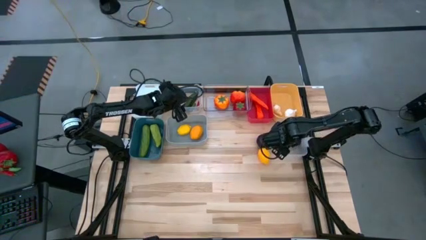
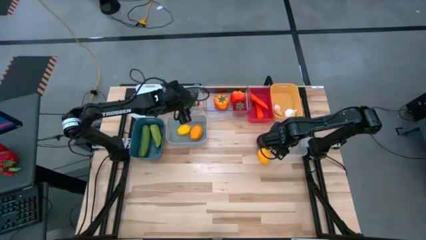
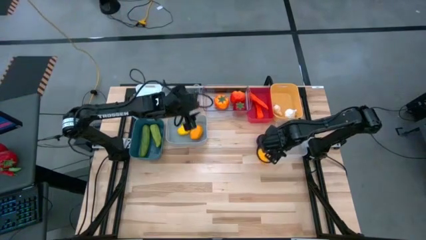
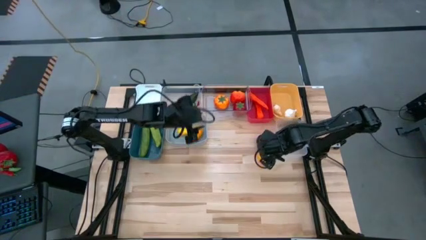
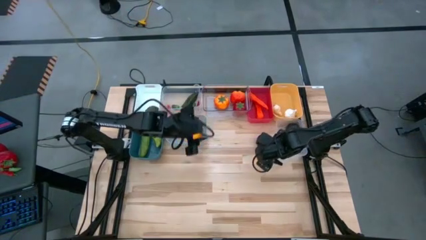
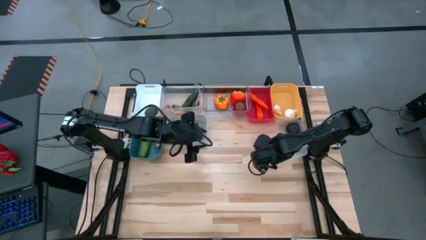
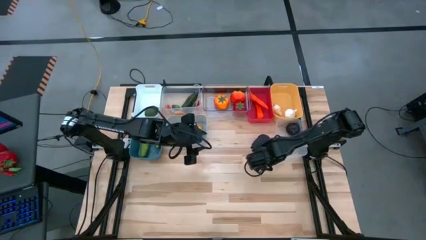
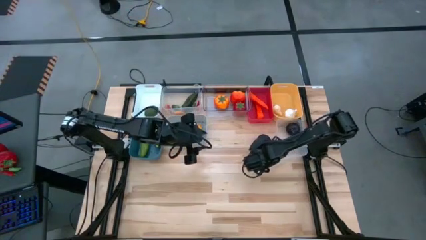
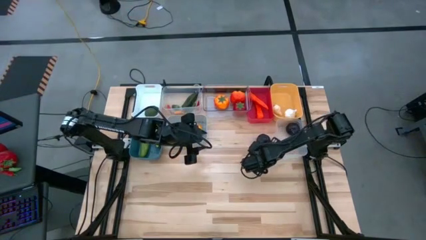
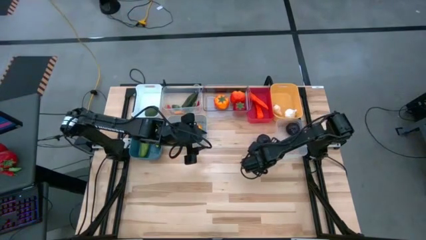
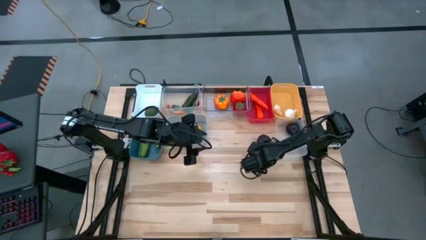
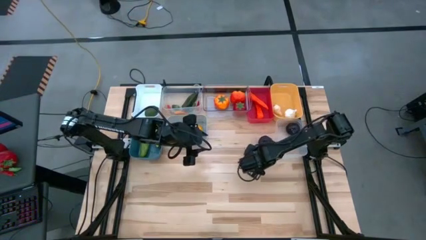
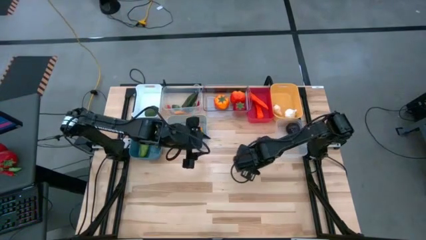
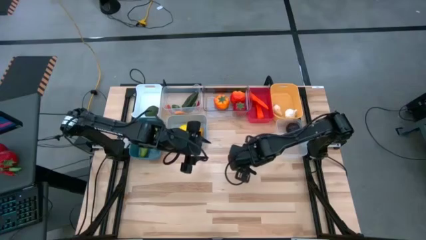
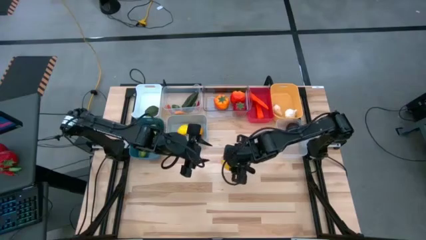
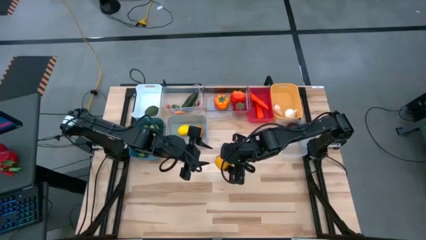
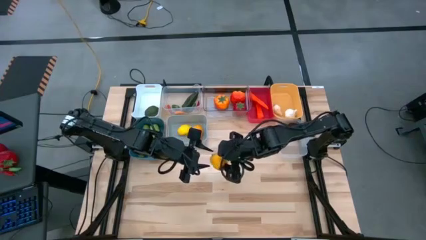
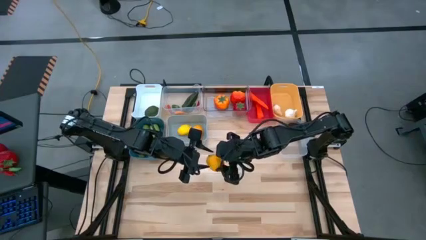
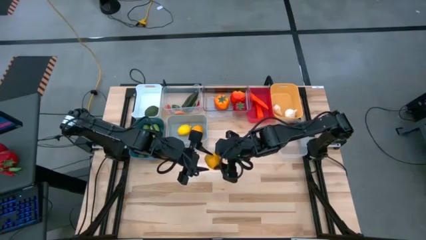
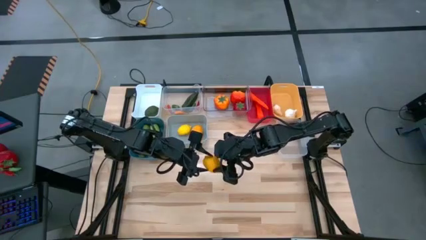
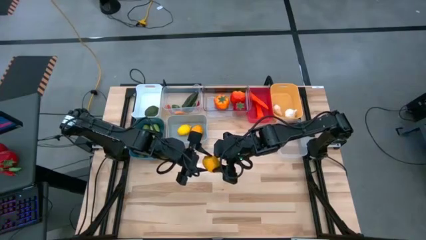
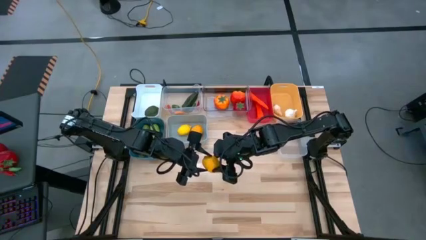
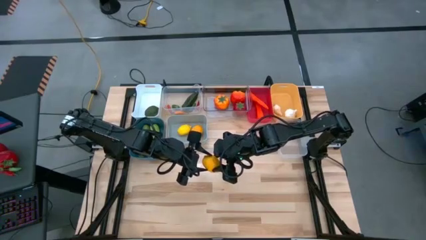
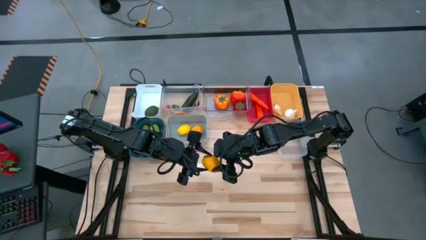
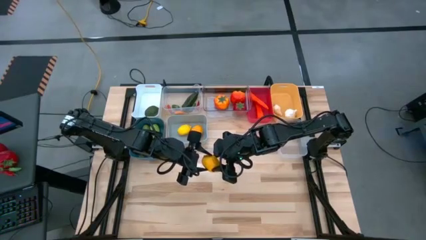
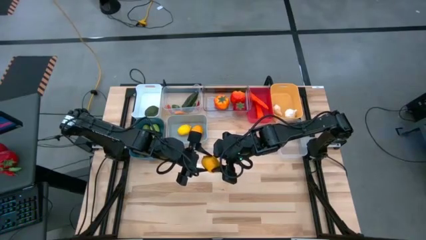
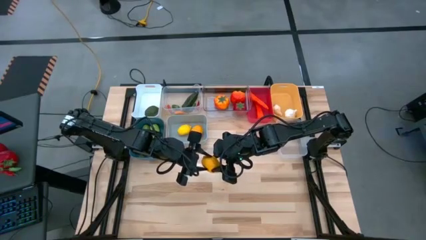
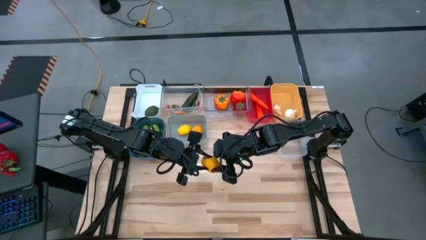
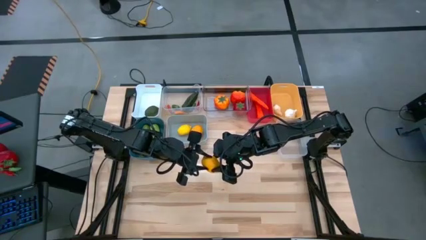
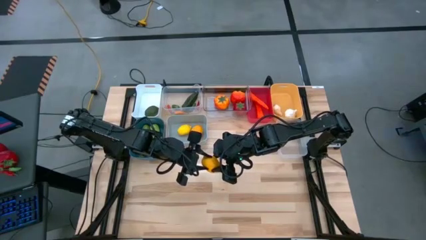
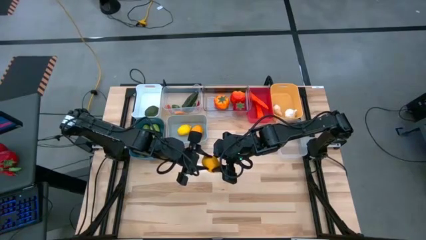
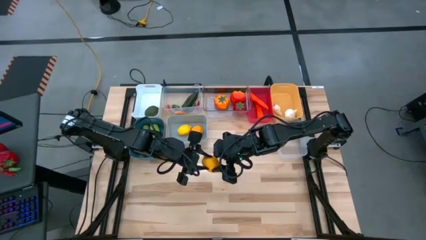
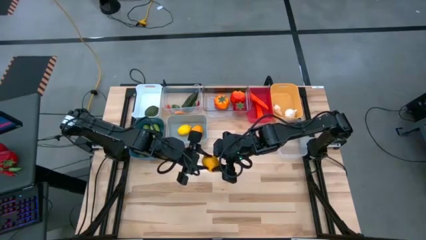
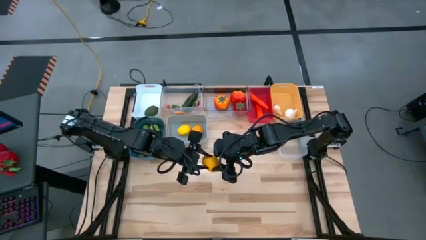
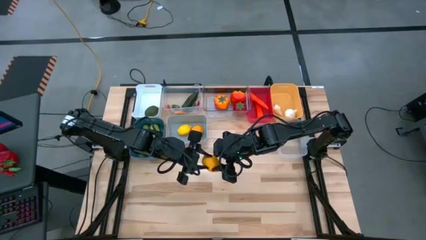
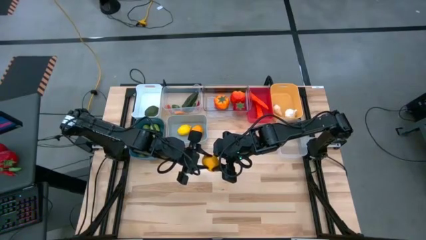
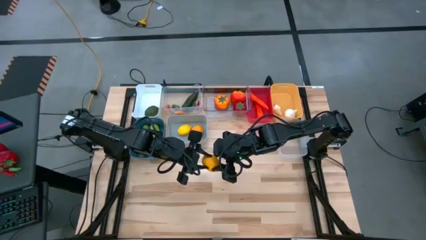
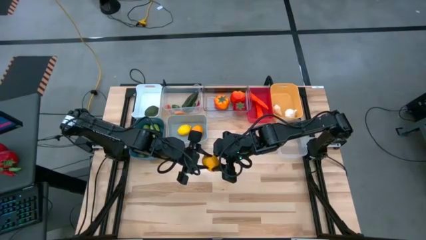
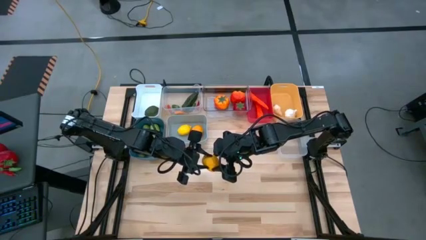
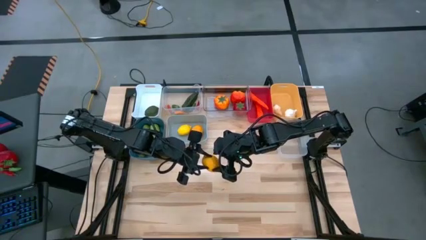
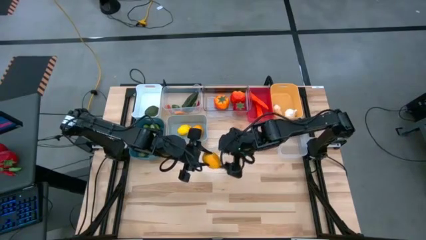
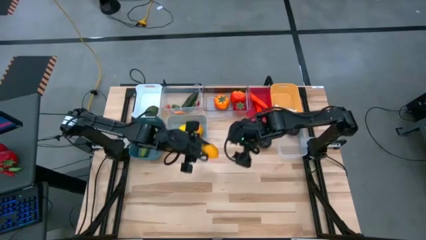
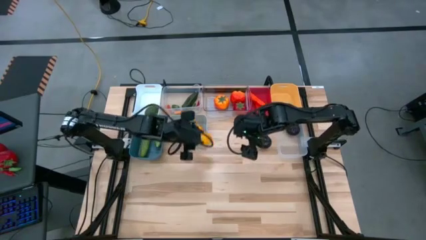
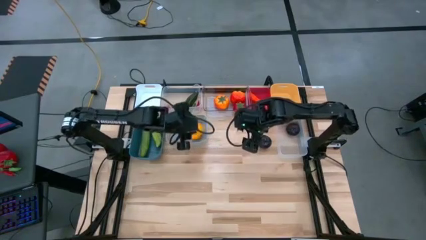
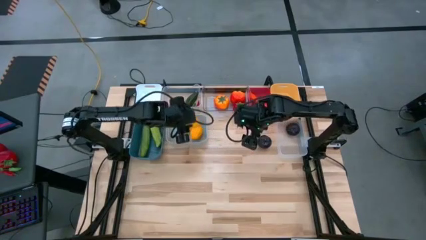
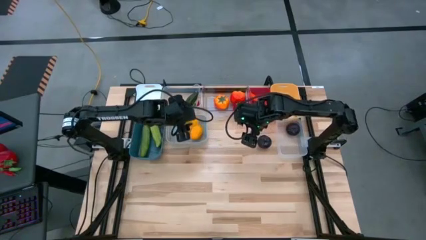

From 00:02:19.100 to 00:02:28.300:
Task: Sort produce into baskets
Put the lemon into the gray bin

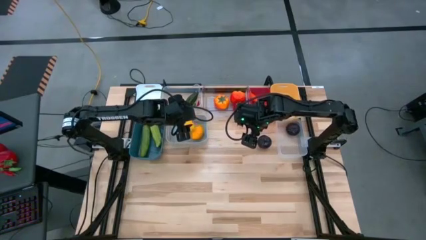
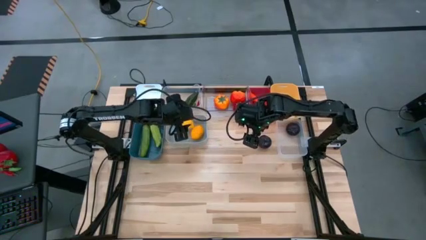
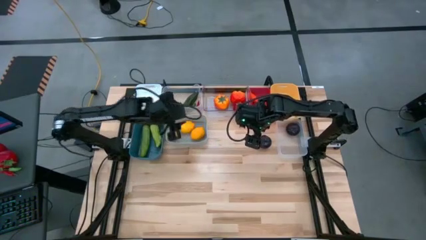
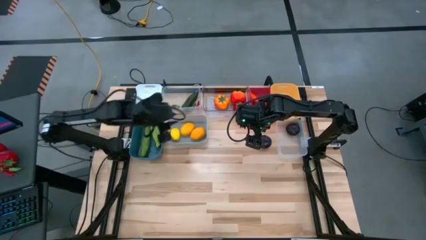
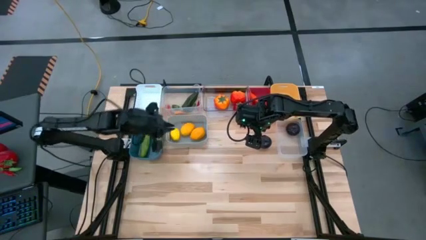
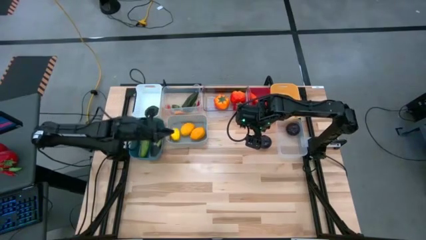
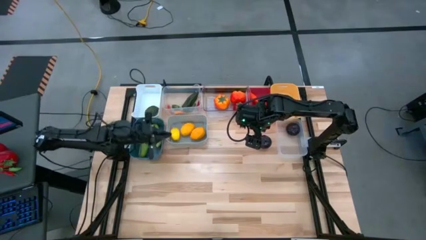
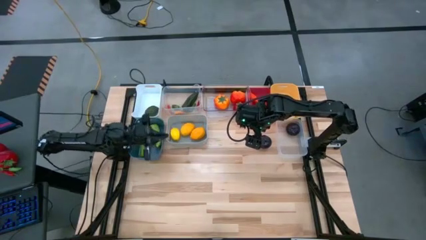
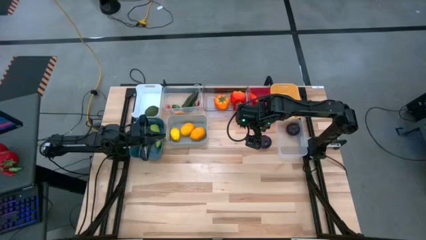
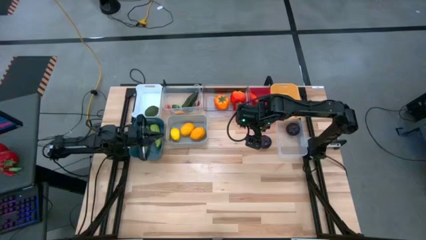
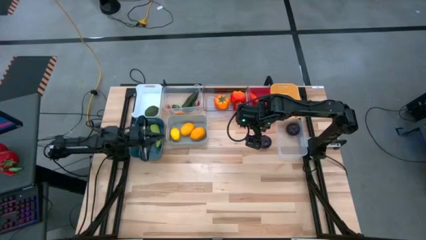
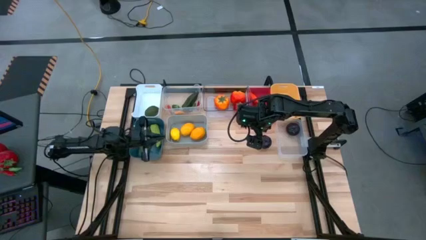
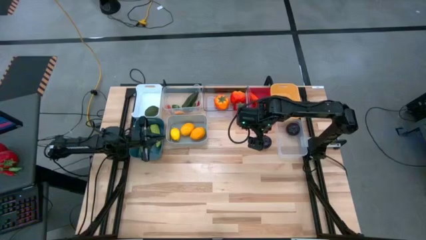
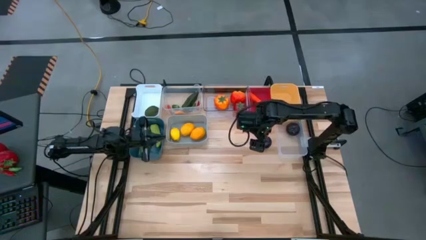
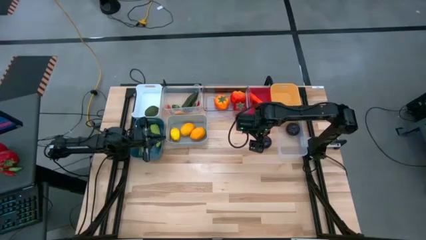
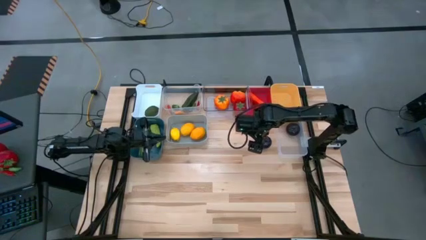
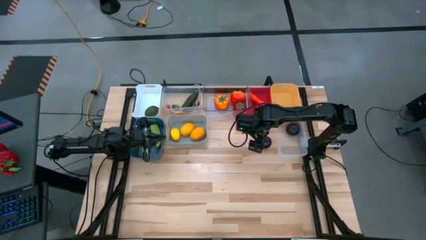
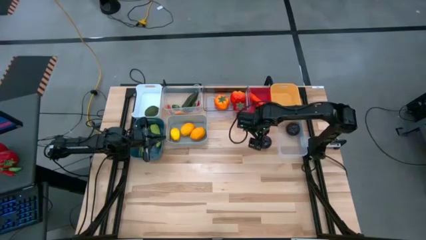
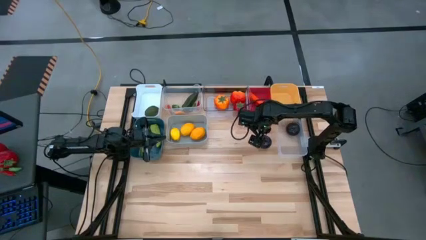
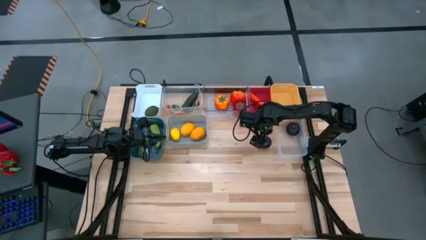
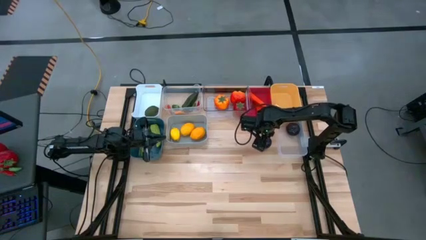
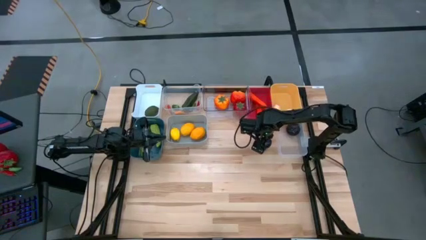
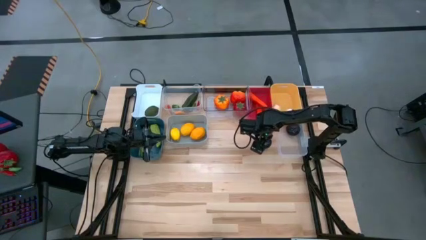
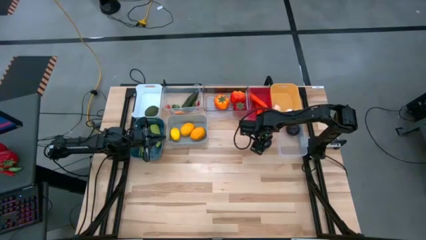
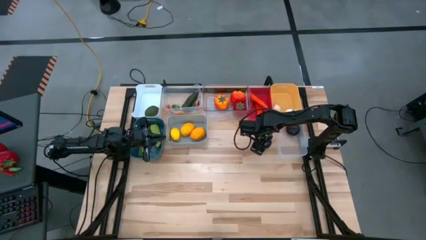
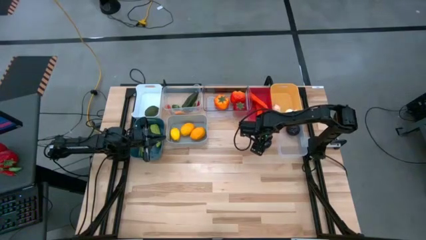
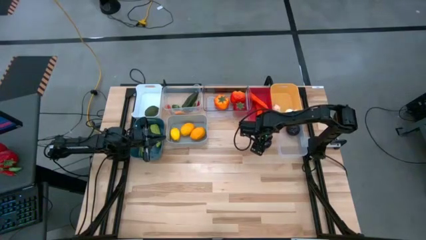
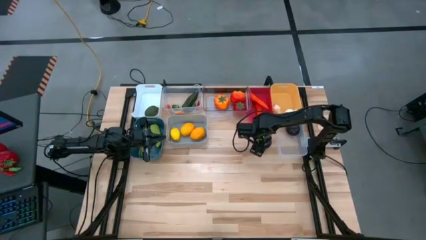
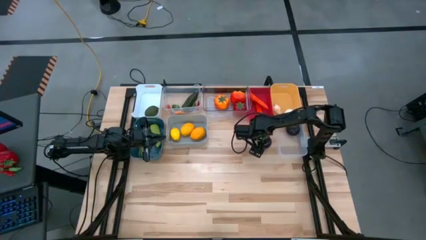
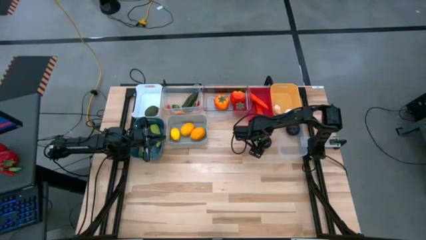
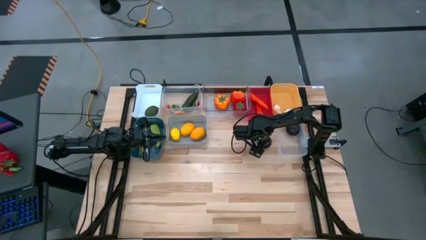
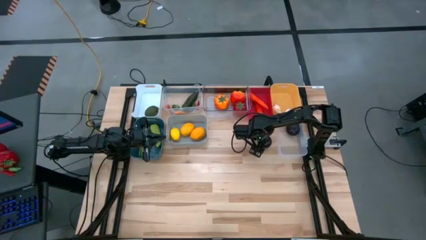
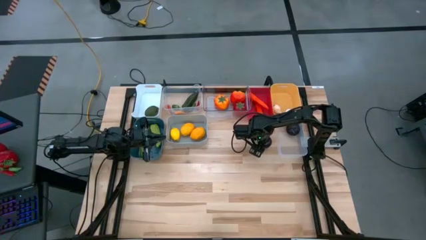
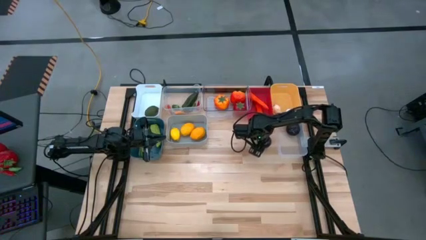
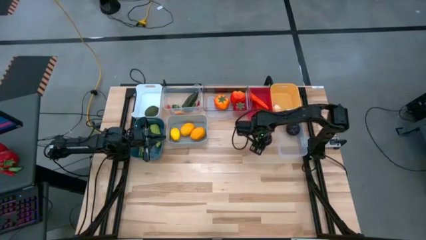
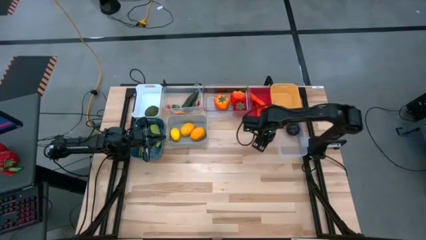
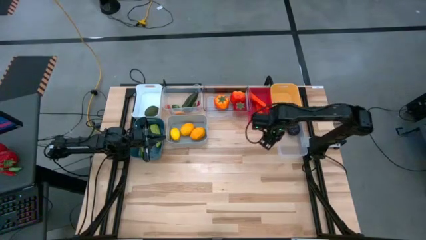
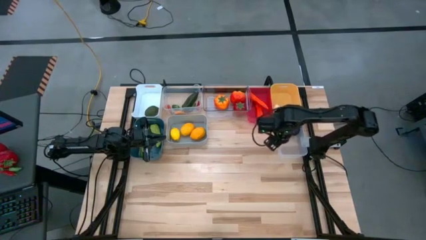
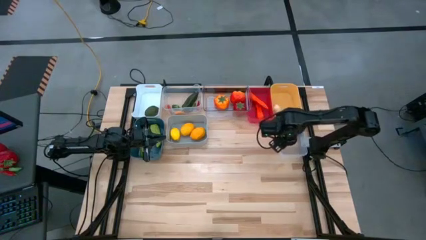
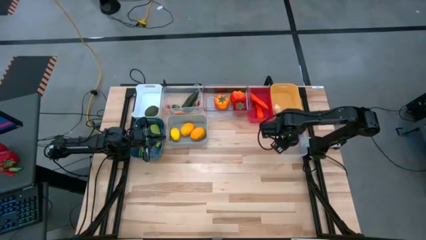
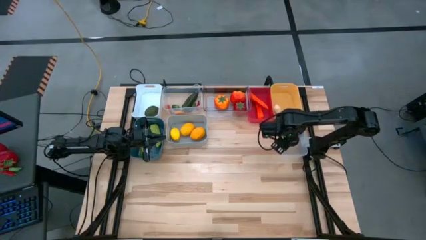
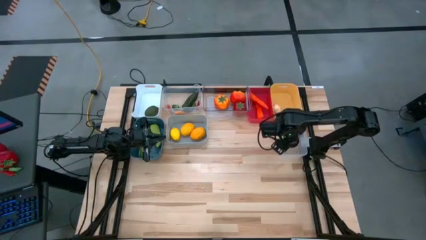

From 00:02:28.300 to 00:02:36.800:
Put the black plum into the bottom transparent bin
